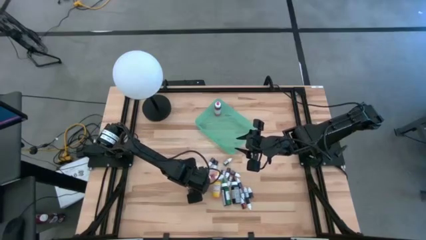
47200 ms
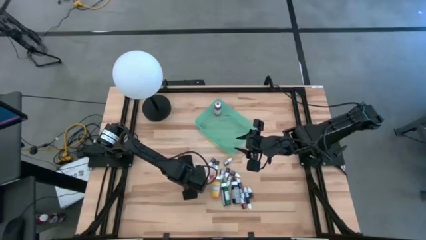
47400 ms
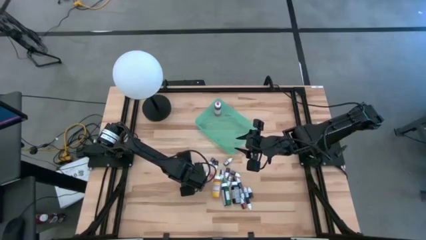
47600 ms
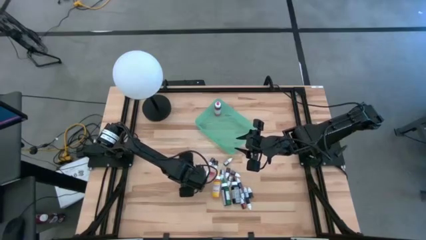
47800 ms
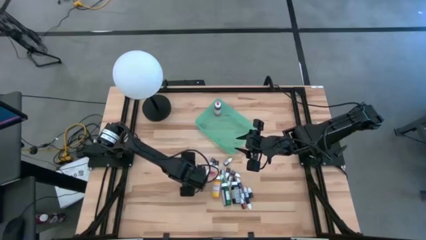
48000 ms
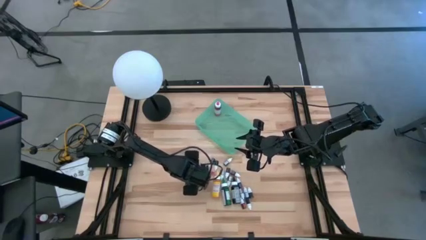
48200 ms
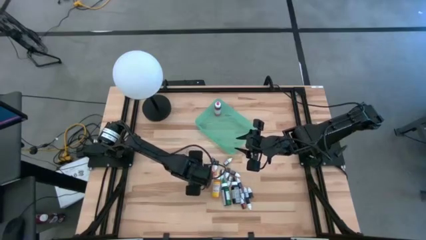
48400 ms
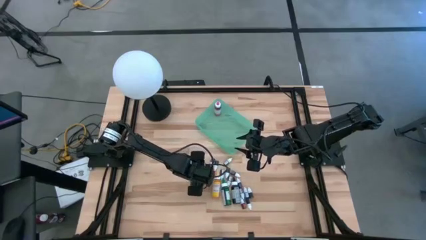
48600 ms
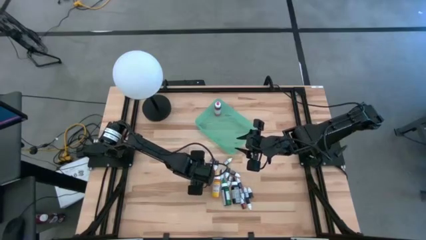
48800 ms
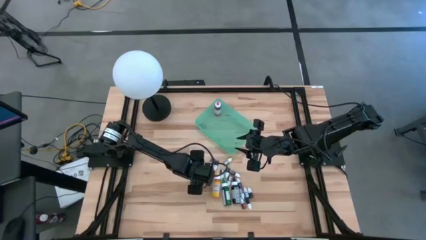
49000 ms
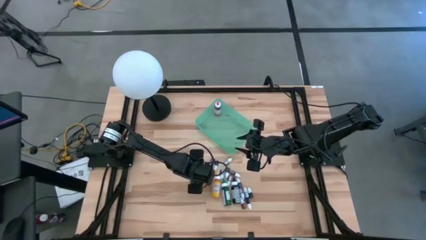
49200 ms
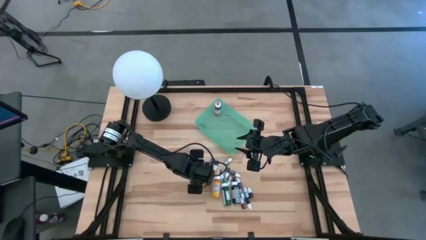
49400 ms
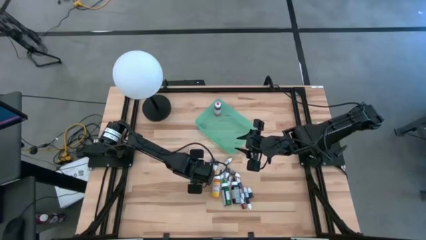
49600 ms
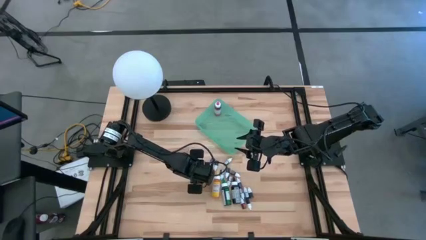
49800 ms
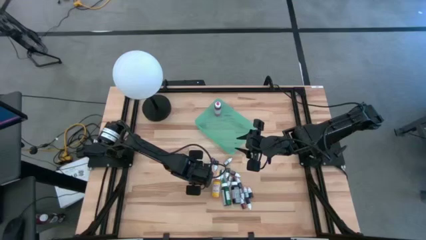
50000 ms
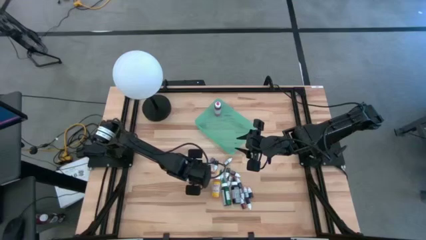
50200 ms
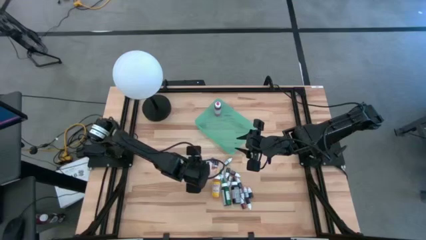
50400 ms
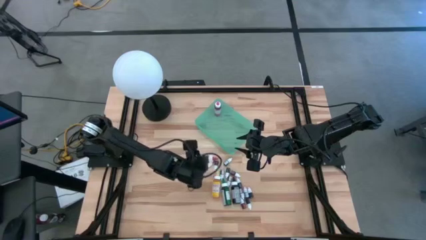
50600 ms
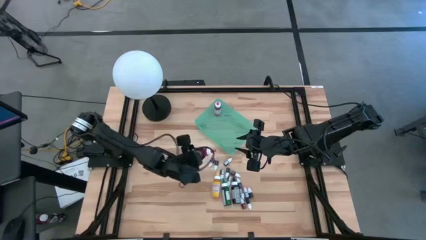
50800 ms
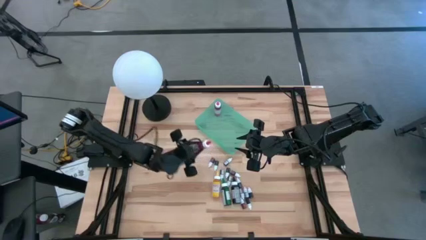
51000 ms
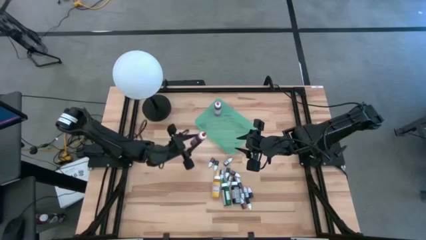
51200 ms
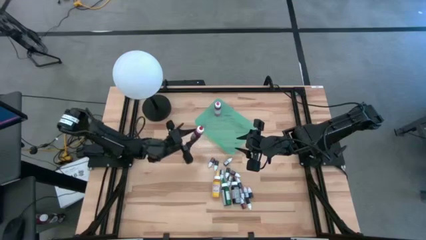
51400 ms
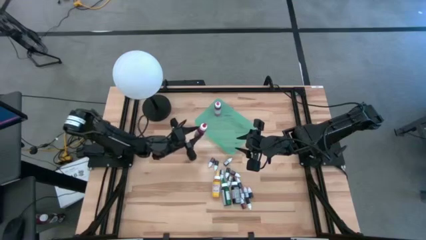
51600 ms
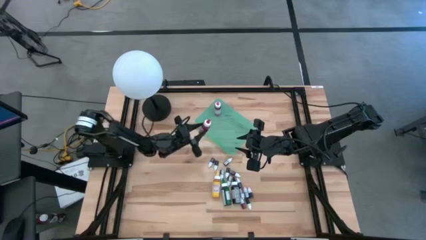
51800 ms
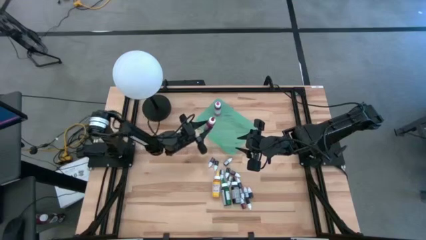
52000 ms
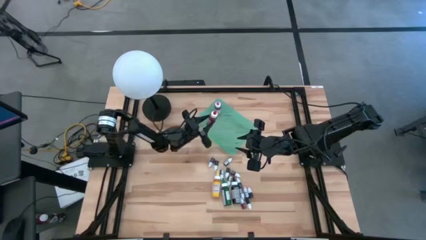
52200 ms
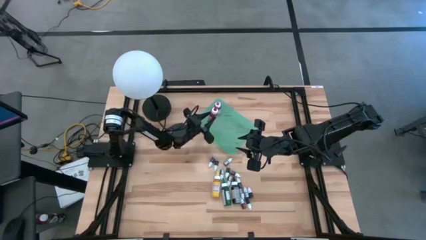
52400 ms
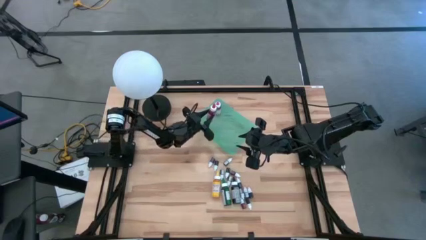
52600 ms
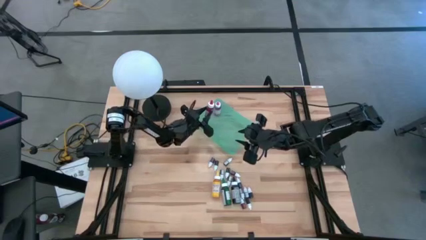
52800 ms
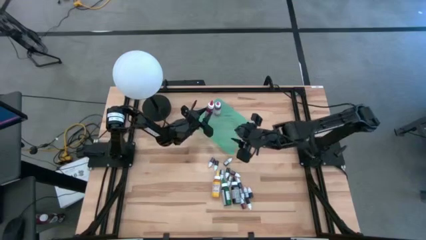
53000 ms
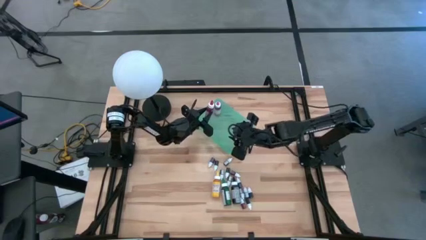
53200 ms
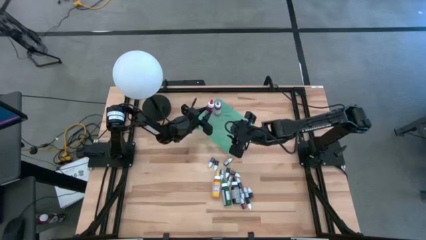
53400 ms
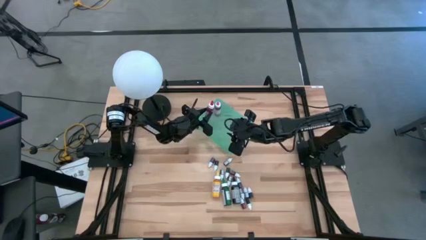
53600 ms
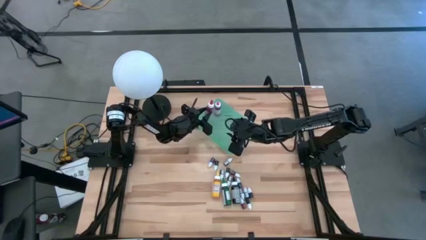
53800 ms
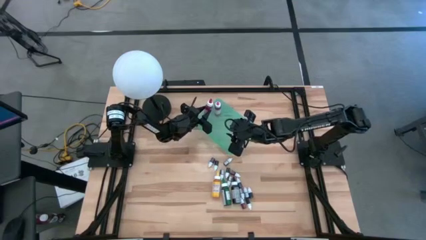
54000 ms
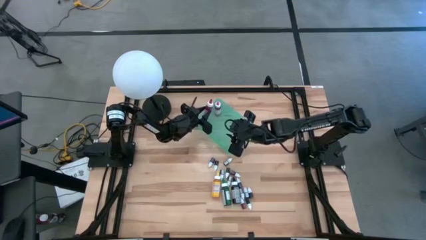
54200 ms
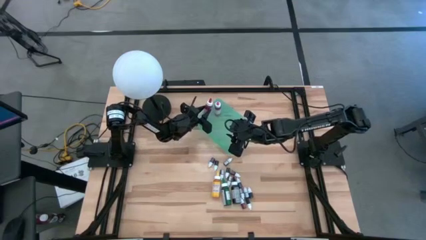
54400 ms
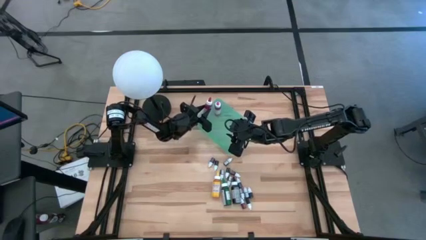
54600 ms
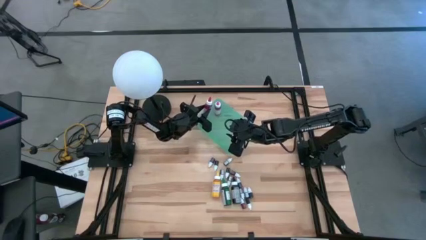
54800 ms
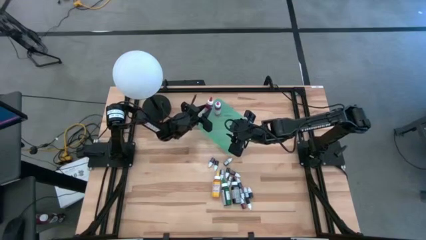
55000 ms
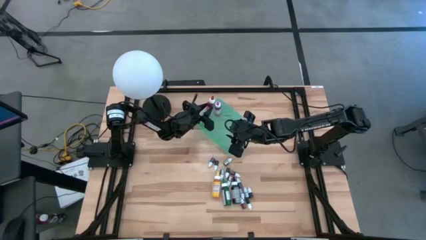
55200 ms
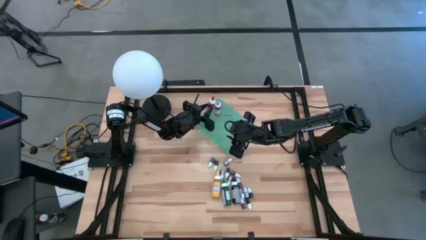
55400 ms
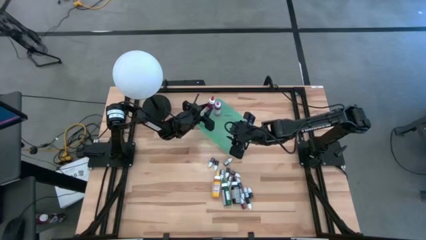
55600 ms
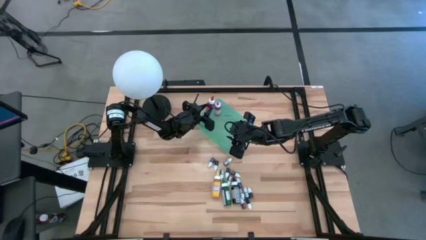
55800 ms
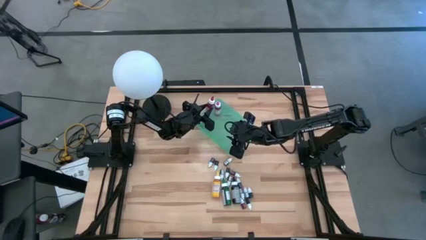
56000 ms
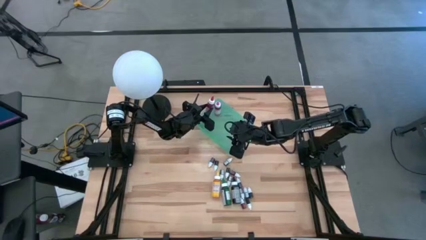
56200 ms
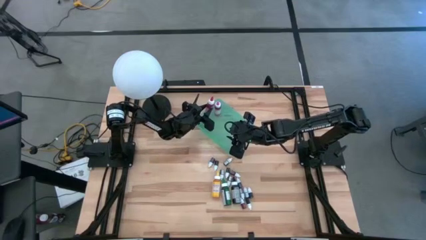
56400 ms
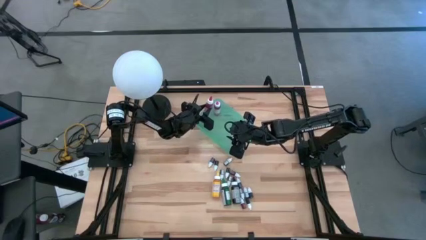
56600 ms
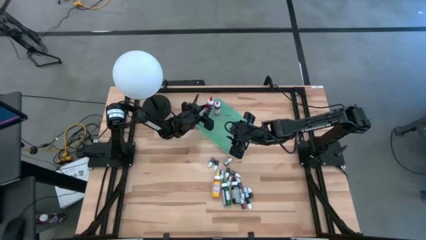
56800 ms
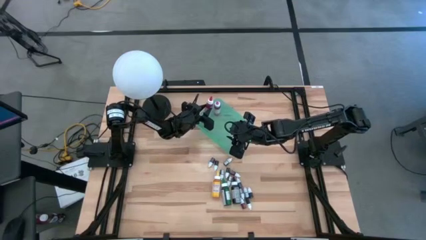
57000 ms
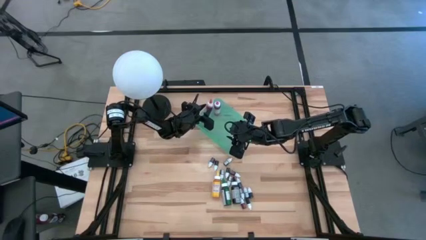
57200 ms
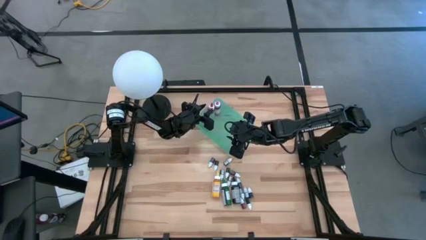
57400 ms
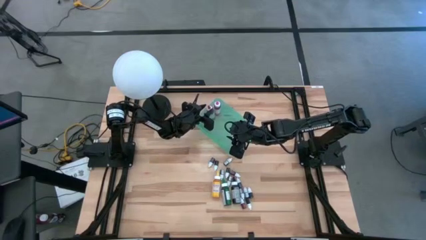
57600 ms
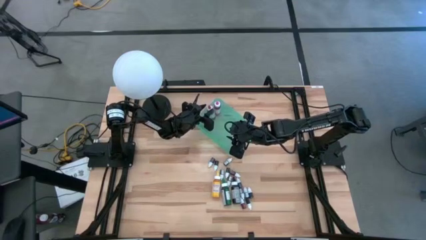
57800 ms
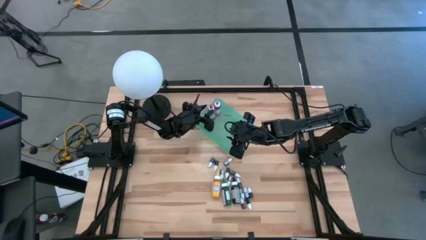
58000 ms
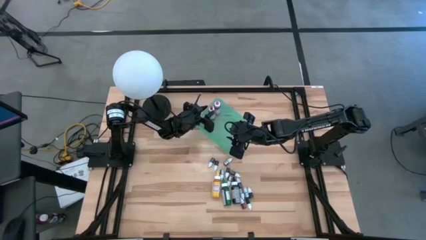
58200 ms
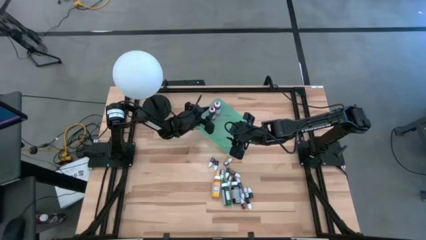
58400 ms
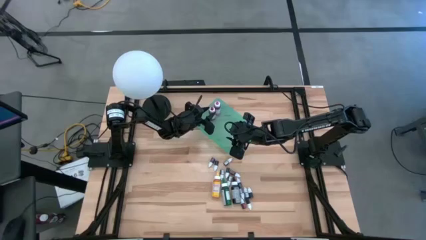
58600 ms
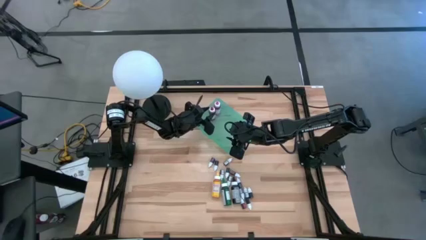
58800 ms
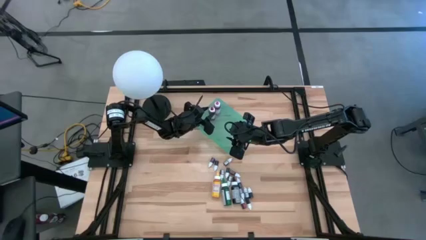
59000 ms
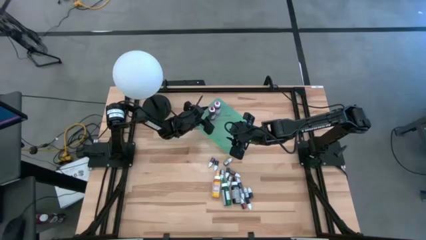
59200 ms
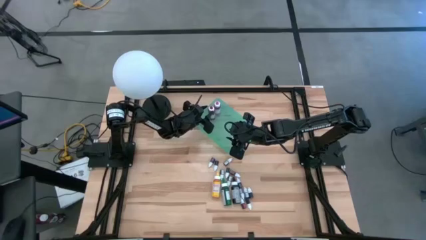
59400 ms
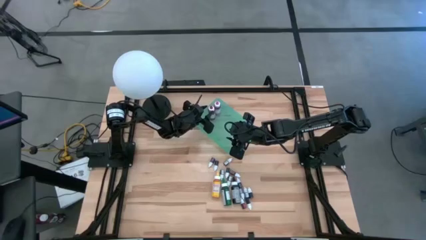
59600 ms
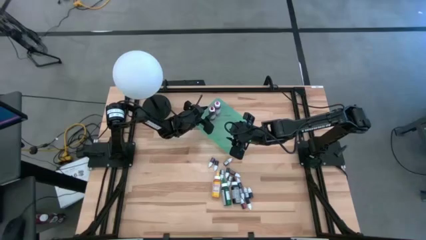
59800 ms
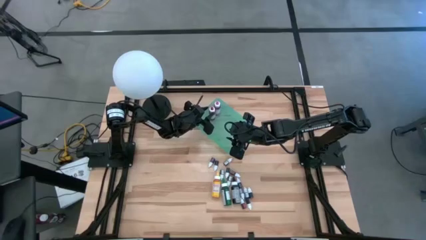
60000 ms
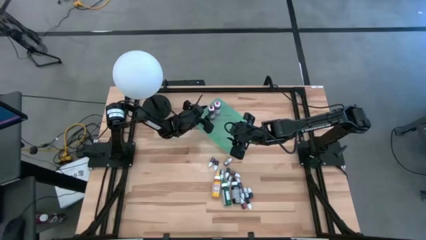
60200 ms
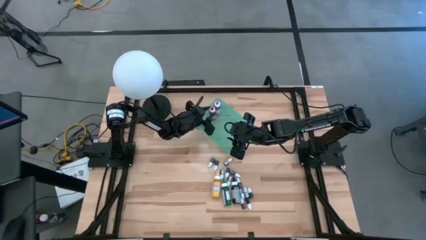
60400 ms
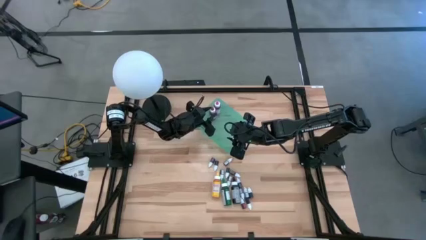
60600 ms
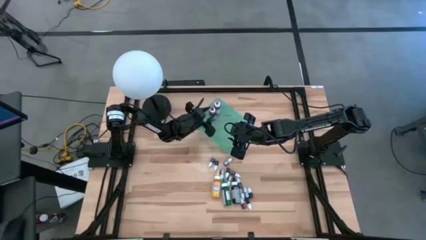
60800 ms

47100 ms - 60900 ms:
Task: Pick & Place food coloring
Put the large red food coloring bottle into the green bin
